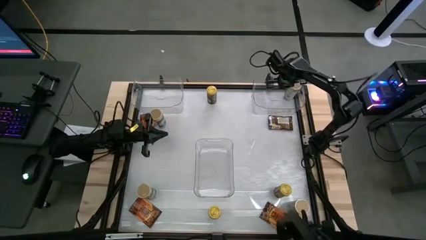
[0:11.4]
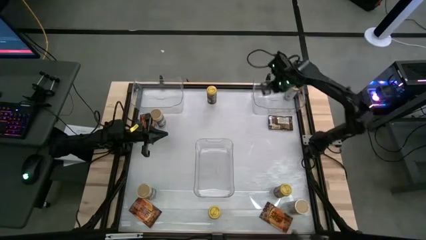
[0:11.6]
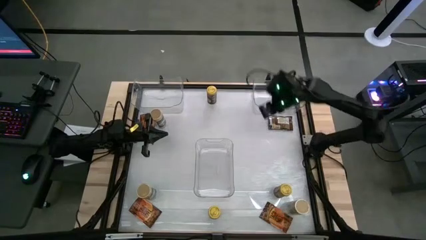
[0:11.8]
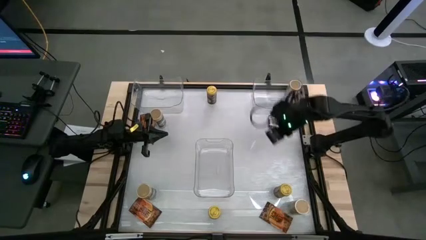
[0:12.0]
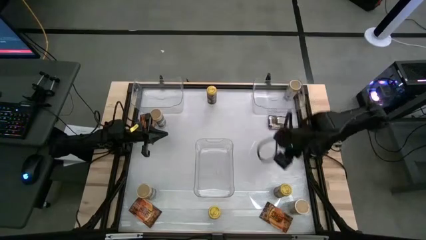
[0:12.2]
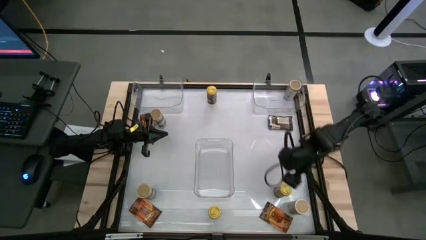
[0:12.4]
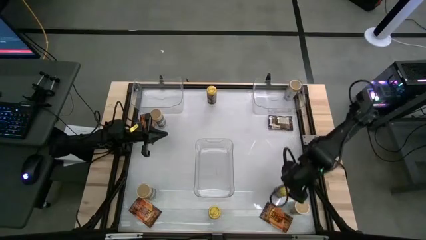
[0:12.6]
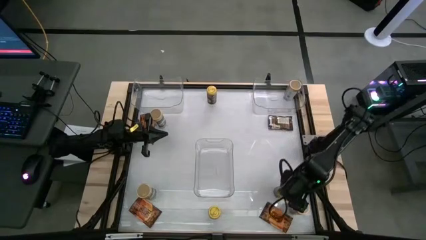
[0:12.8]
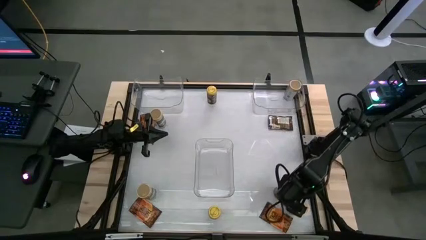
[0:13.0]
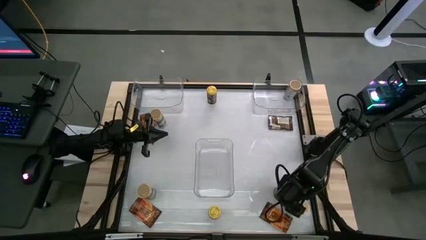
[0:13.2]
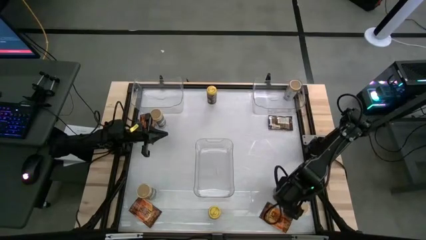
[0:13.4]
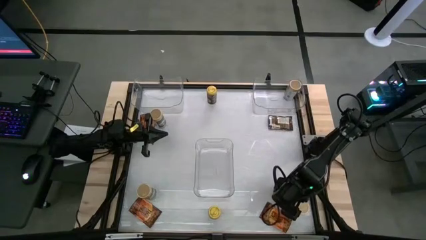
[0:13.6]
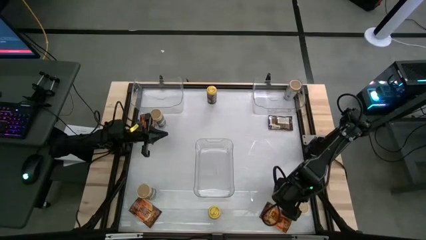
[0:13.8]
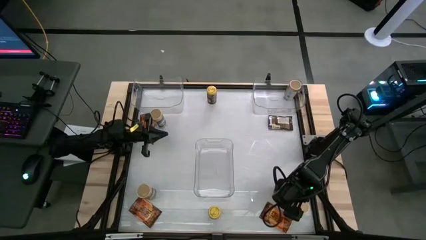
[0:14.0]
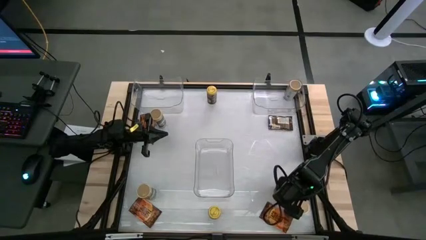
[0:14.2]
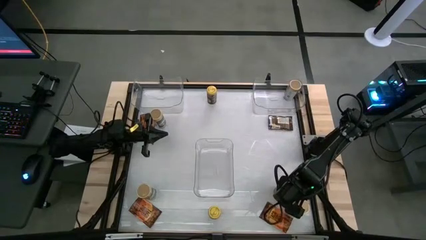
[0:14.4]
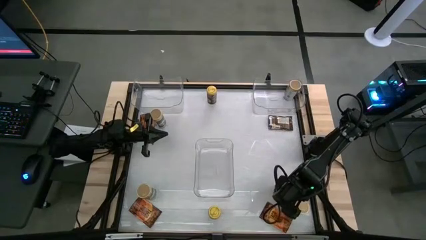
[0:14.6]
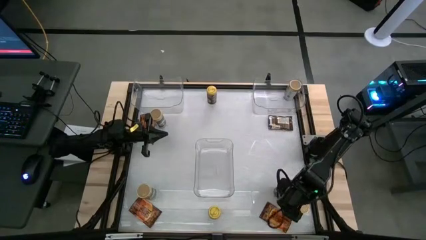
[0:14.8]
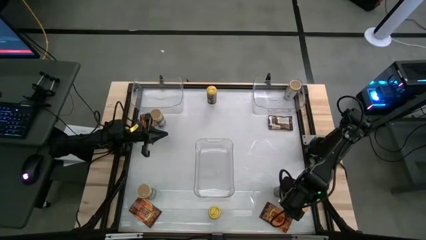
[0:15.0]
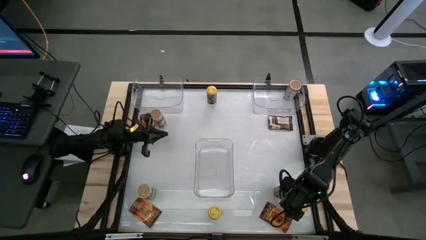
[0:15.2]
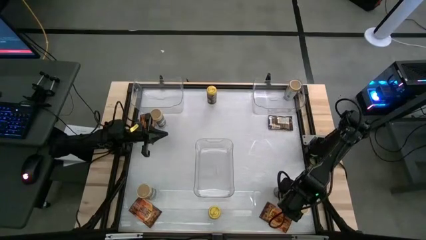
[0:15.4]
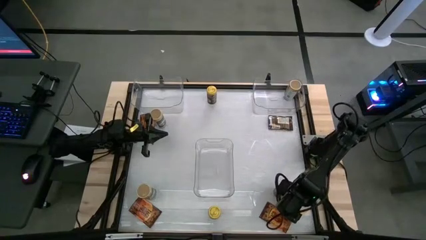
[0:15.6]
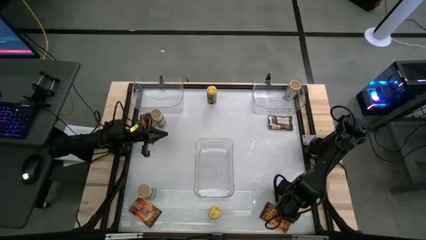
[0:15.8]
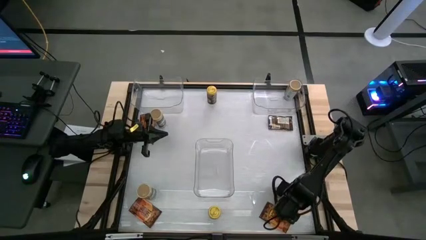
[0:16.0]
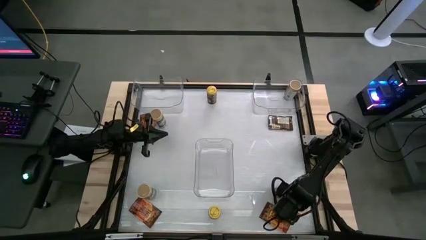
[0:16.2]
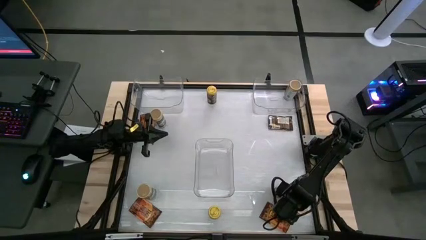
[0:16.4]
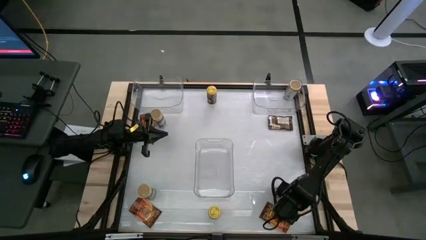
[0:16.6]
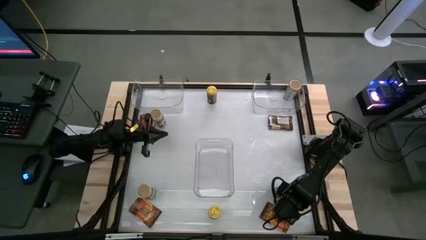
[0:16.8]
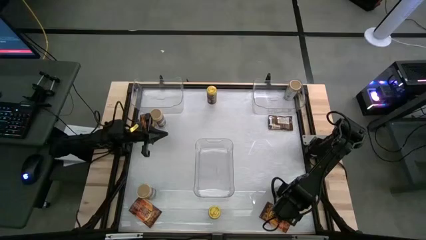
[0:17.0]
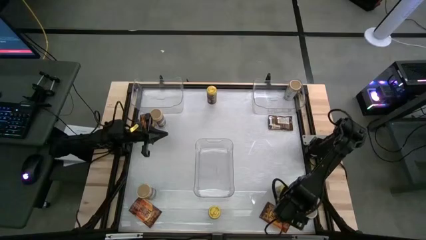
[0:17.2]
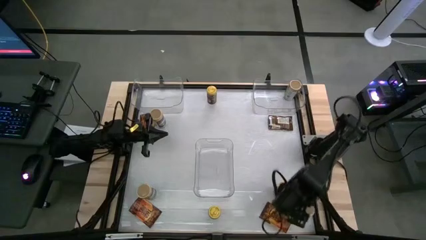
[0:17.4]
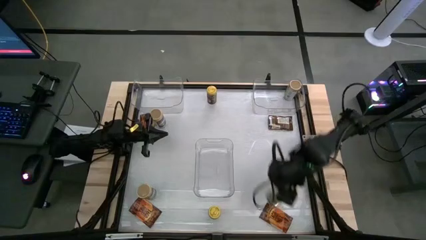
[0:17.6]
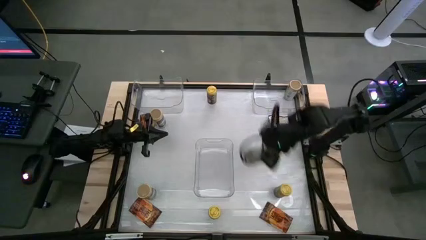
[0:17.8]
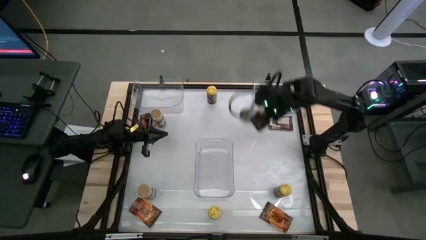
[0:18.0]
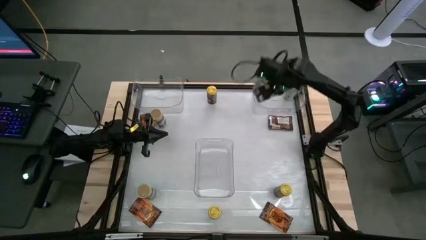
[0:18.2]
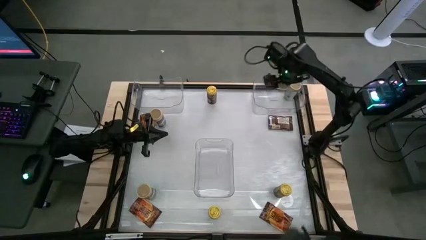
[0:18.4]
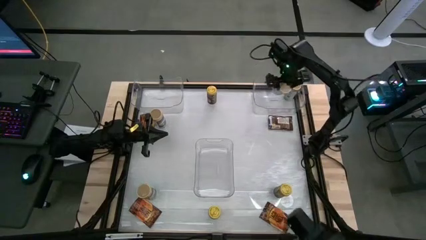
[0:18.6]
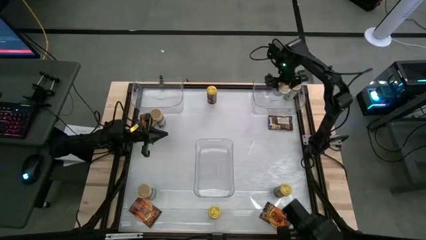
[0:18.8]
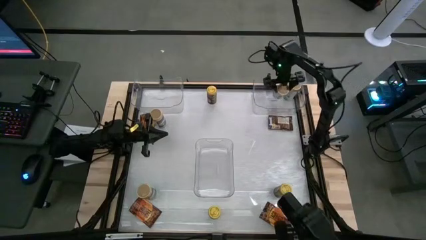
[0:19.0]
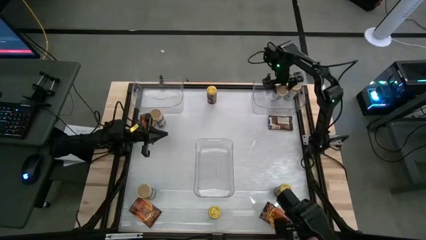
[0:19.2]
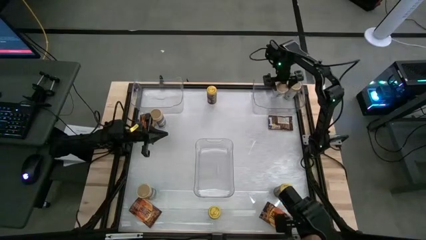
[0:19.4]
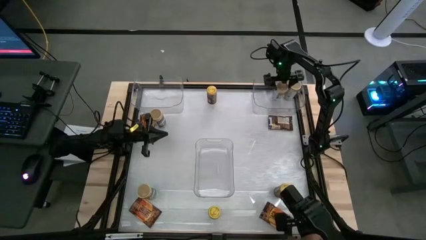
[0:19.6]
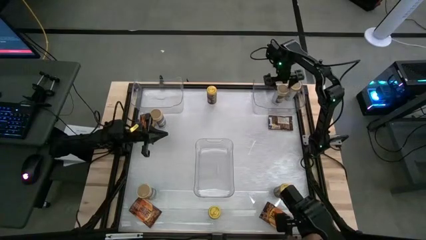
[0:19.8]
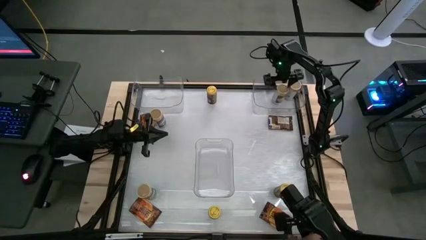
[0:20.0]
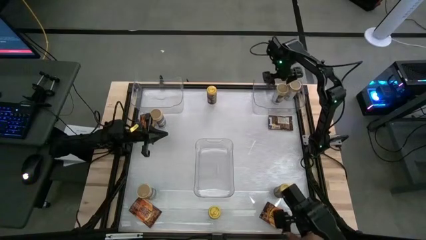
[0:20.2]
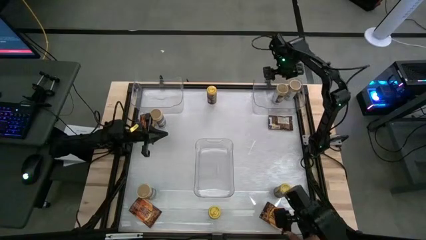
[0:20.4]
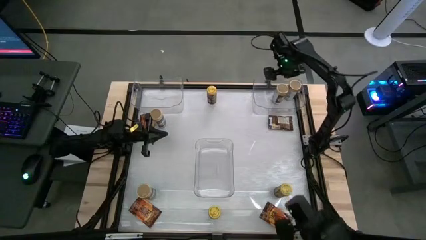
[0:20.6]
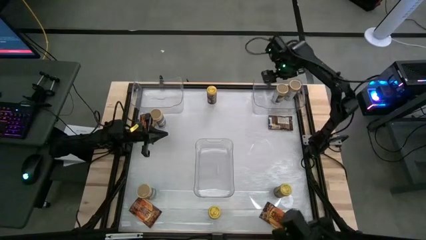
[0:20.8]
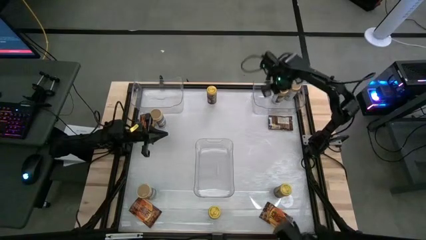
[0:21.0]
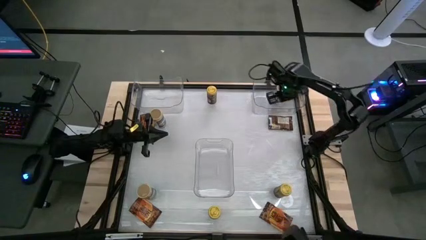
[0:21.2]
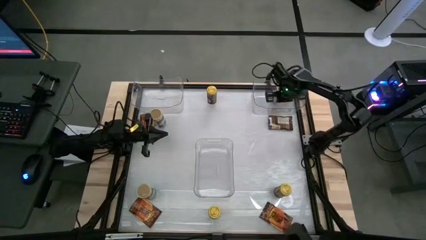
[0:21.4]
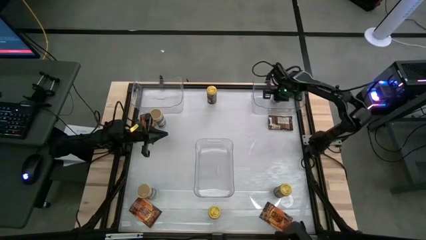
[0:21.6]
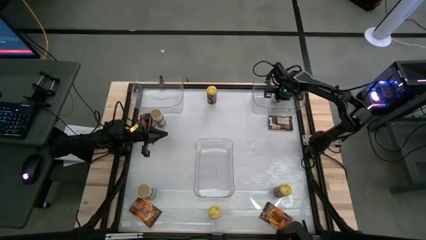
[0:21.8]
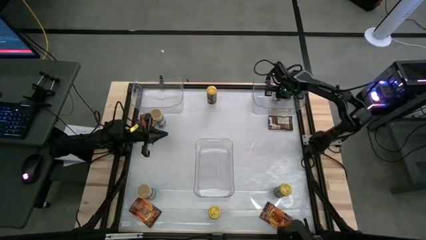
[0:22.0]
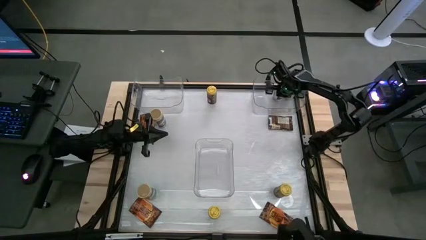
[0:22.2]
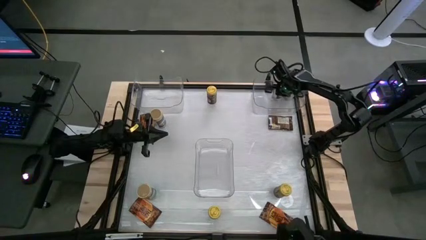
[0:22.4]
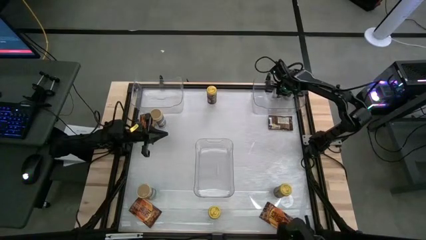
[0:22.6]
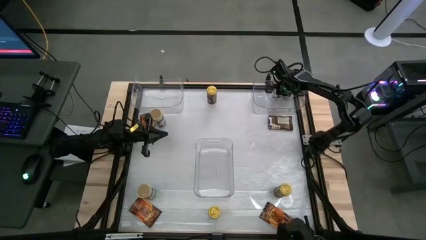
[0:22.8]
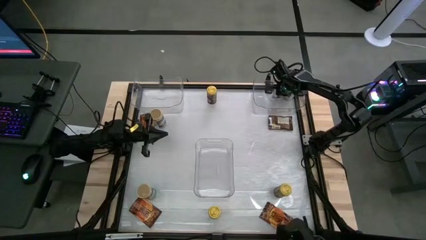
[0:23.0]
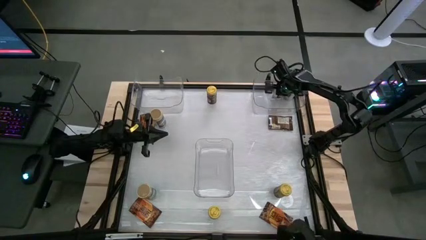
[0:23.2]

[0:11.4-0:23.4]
Task: Sort spices by type
Put the bottom right brown seasoning bottle into the right transparent bin aligned with the other brown seasoning bottle

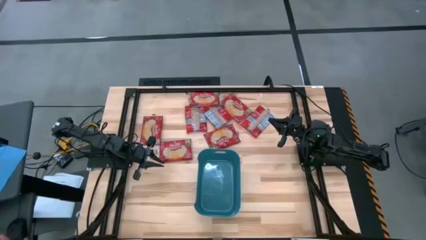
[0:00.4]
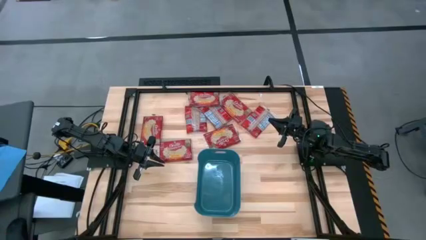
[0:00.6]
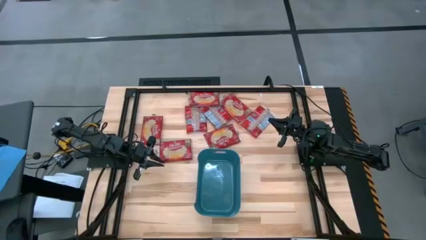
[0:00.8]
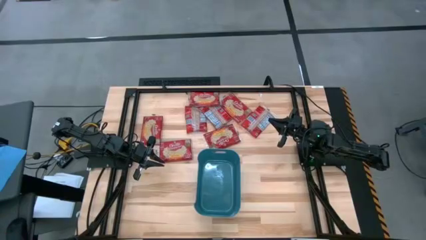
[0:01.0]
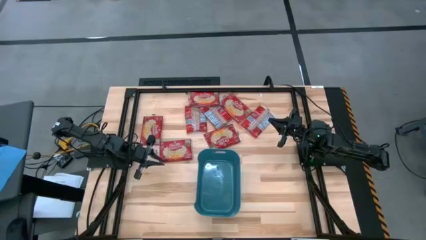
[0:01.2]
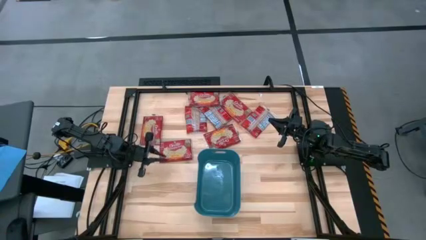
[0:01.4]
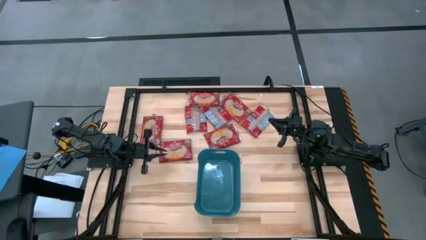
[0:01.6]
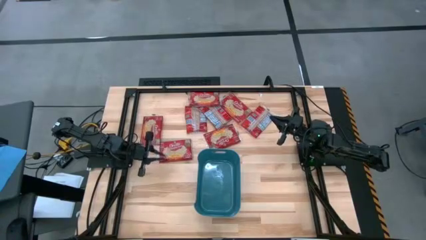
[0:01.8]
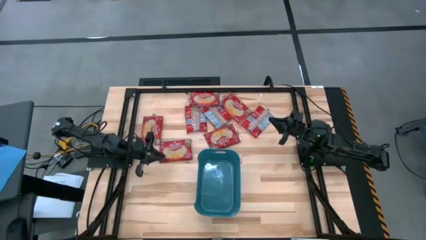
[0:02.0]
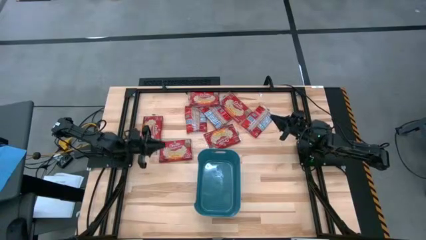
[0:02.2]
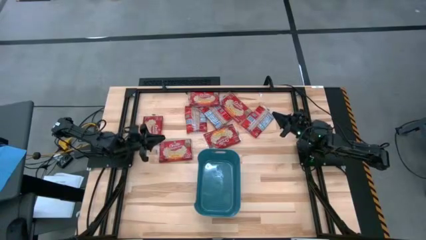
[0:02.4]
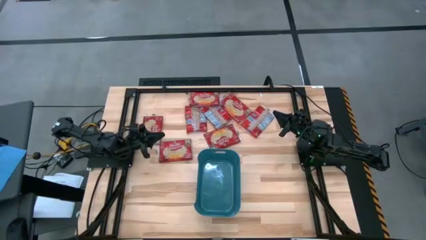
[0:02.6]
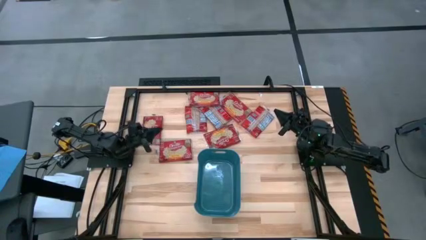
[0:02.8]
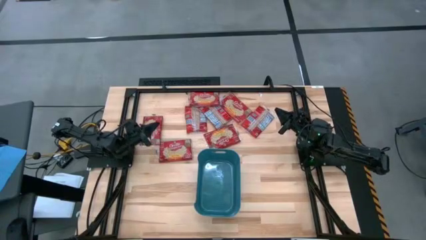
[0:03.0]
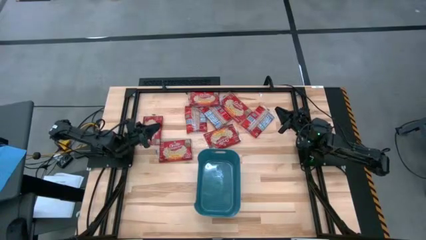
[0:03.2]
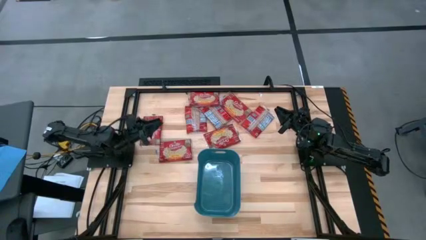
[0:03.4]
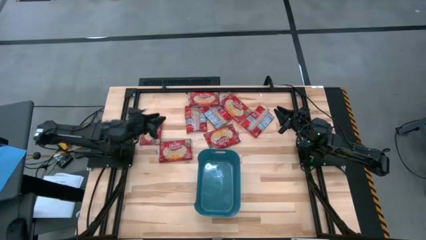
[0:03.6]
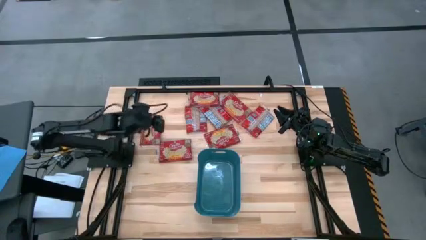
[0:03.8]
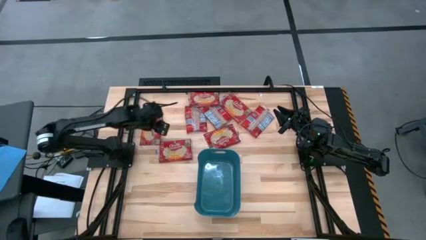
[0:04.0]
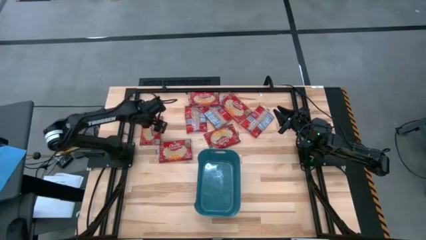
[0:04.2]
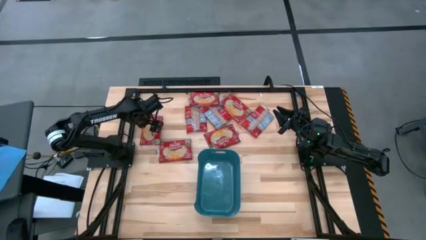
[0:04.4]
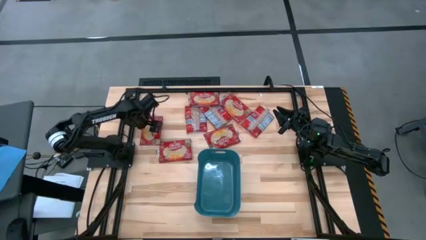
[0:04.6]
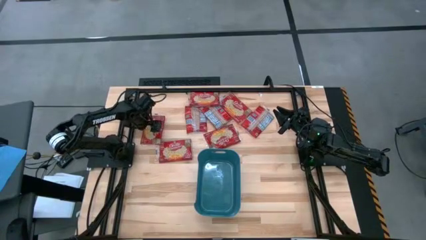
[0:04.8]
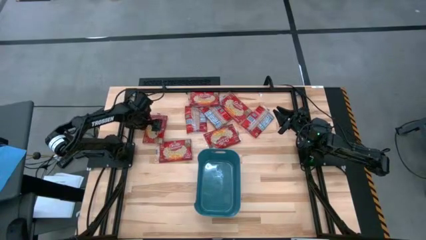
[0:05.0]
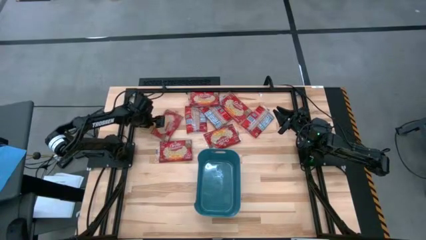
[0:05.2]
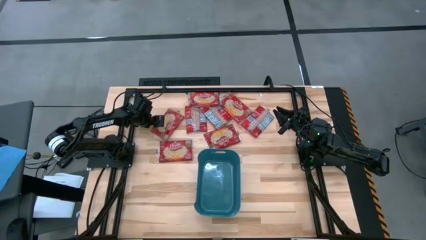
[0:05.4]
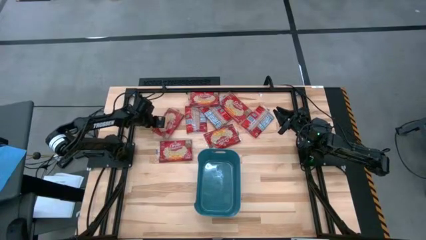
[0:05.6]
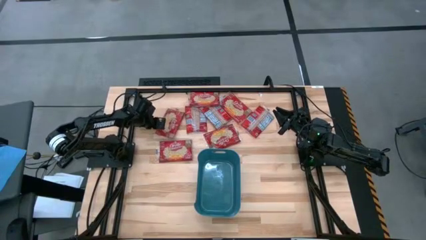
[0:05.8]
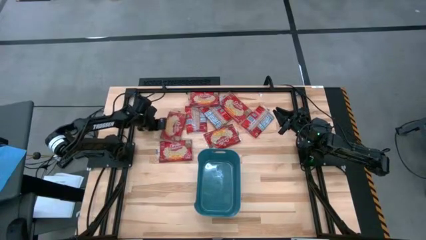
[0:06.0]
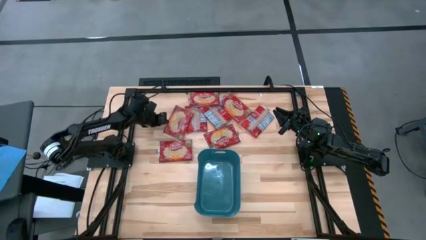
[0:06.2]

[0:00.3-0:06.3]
Task: Sort popcorn bags into baskets
Put the red popcorn pack into the blue container
